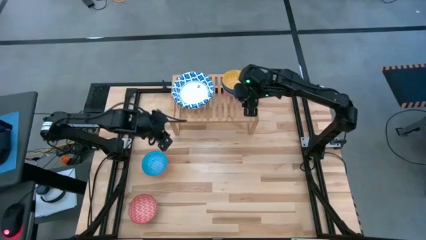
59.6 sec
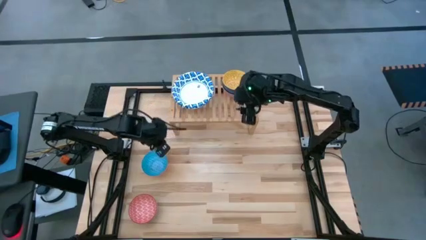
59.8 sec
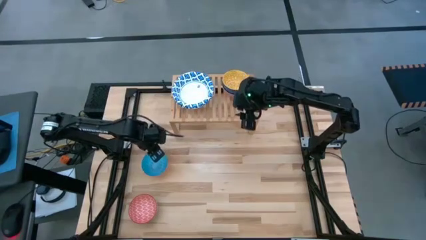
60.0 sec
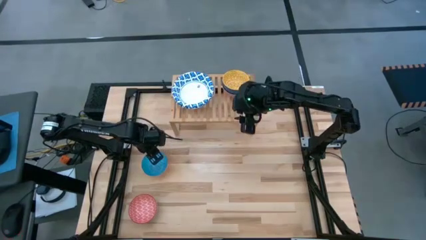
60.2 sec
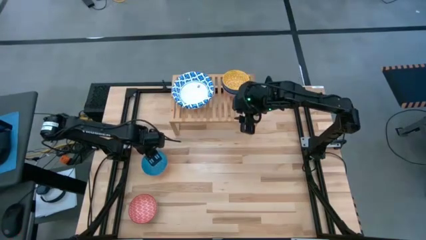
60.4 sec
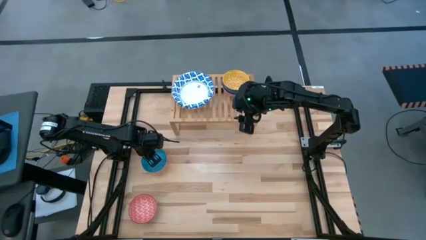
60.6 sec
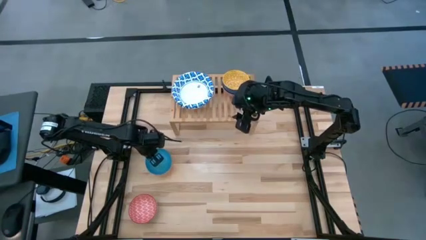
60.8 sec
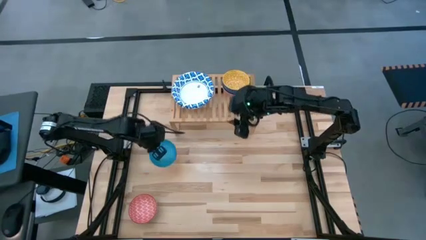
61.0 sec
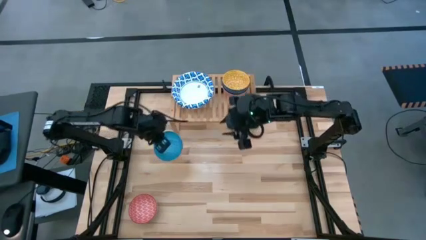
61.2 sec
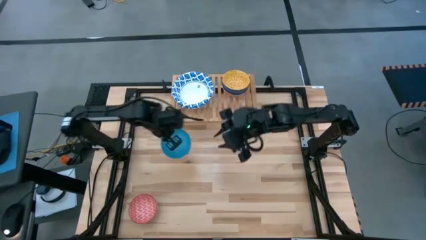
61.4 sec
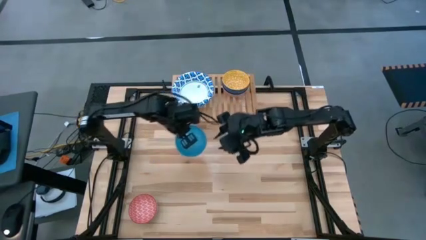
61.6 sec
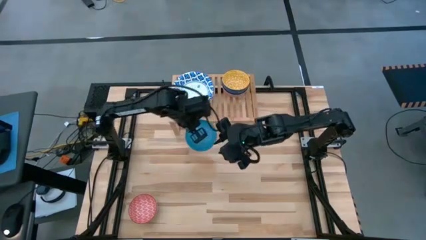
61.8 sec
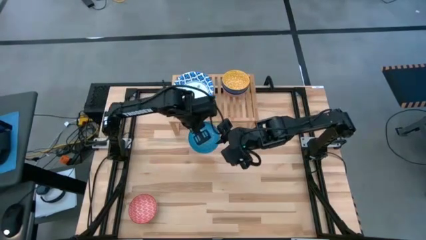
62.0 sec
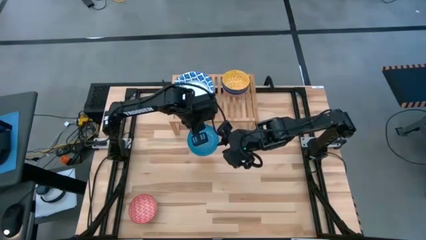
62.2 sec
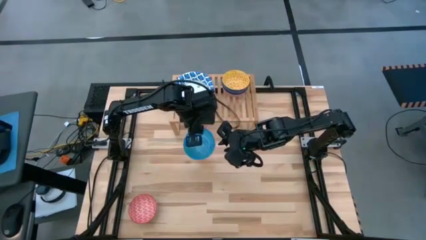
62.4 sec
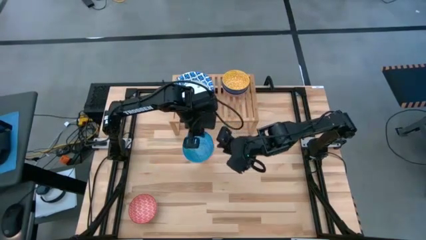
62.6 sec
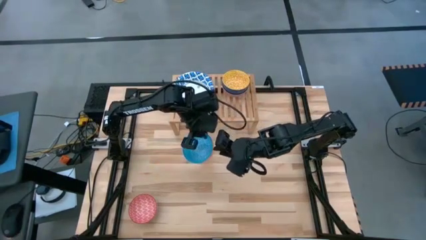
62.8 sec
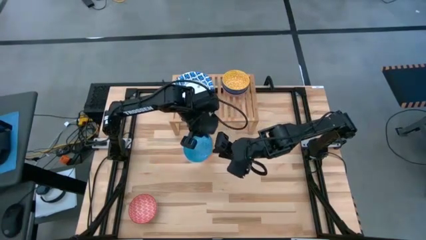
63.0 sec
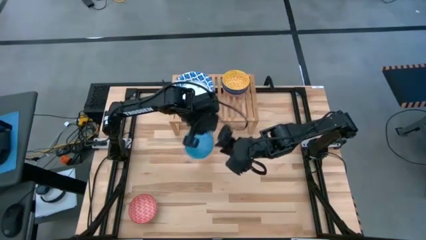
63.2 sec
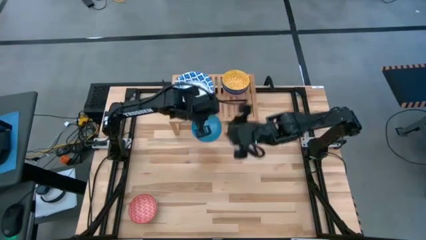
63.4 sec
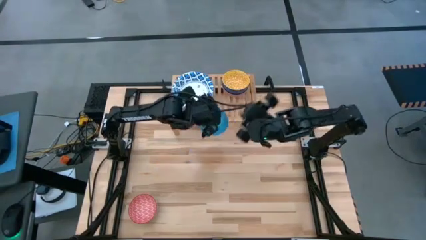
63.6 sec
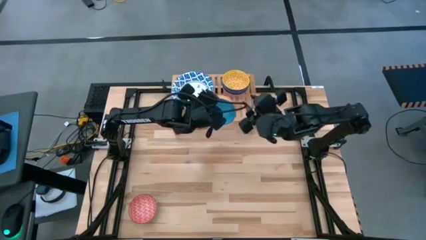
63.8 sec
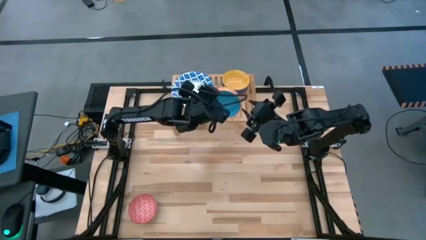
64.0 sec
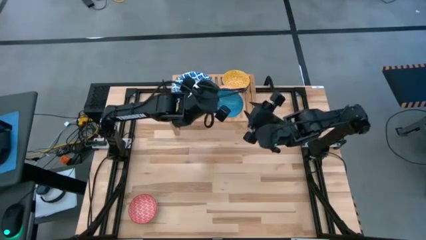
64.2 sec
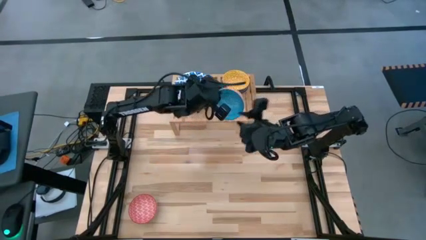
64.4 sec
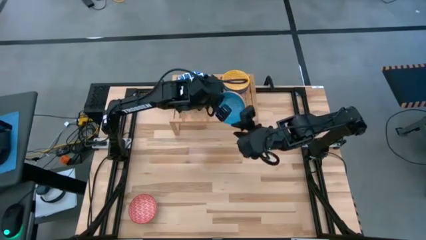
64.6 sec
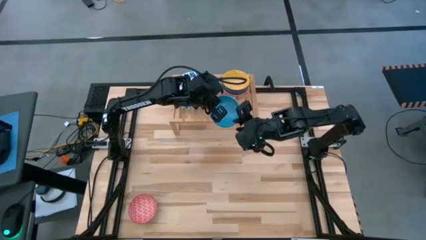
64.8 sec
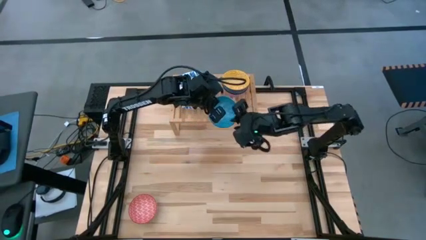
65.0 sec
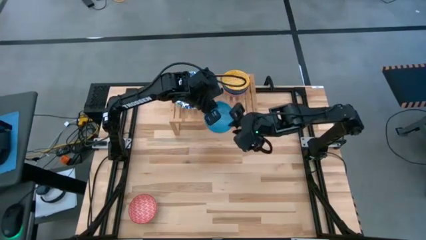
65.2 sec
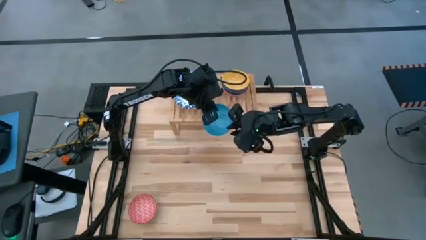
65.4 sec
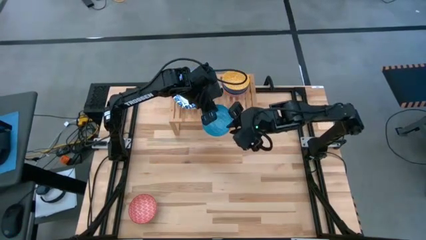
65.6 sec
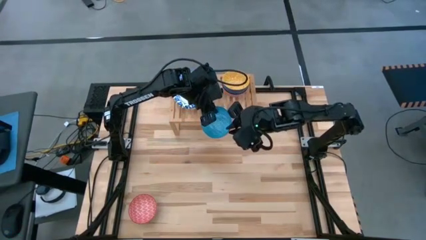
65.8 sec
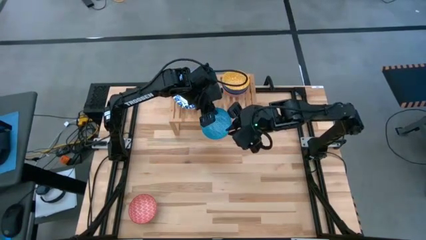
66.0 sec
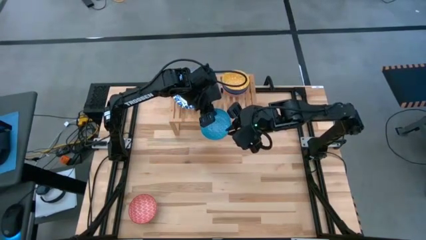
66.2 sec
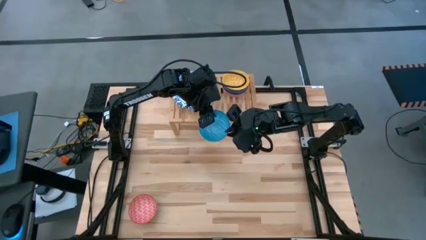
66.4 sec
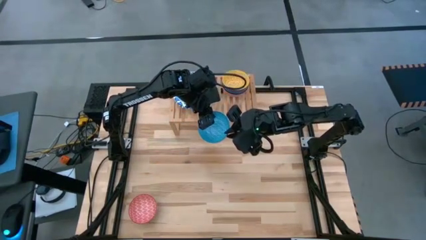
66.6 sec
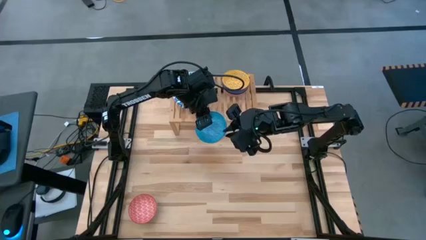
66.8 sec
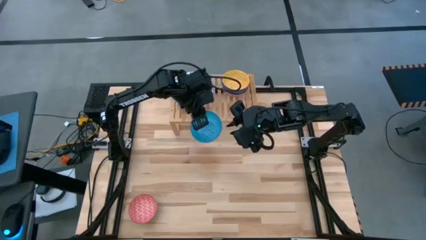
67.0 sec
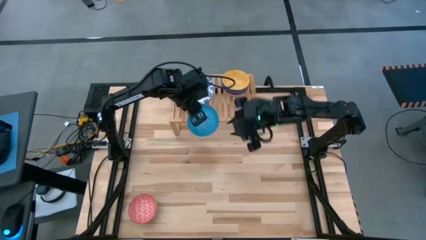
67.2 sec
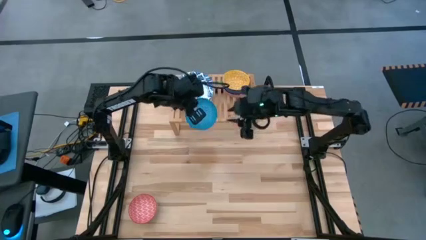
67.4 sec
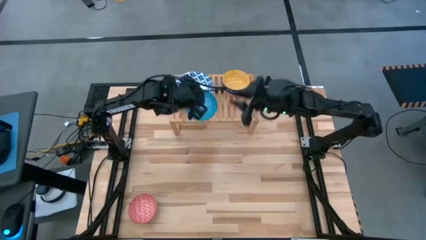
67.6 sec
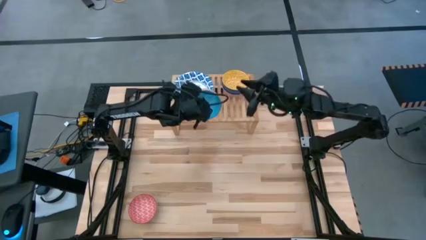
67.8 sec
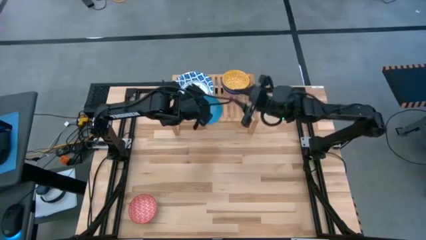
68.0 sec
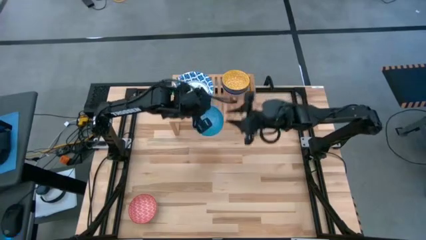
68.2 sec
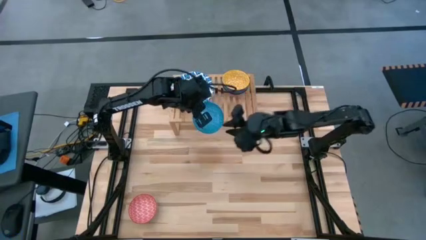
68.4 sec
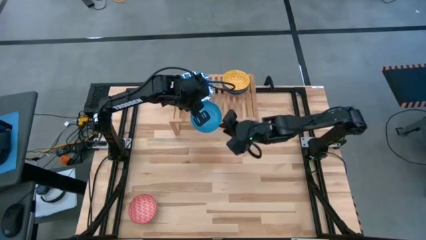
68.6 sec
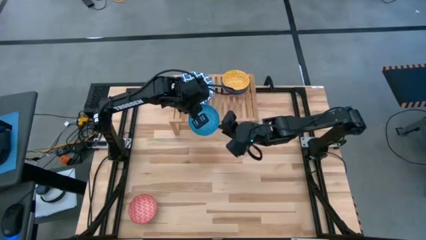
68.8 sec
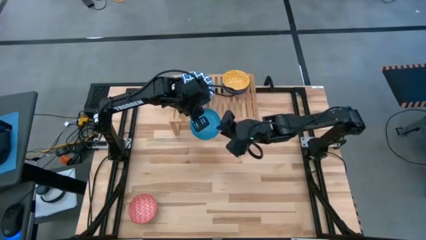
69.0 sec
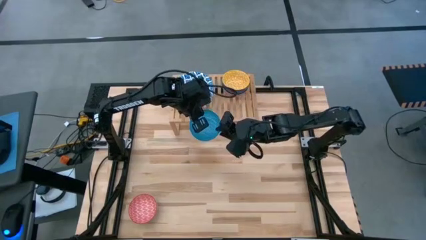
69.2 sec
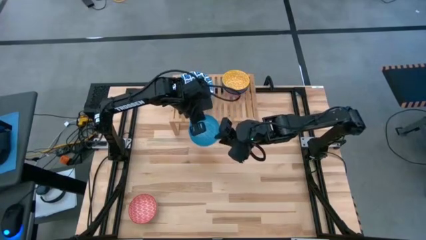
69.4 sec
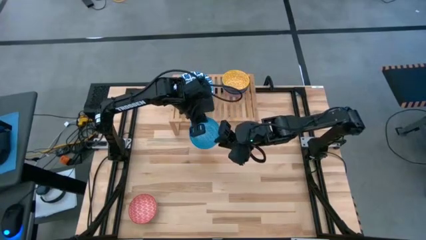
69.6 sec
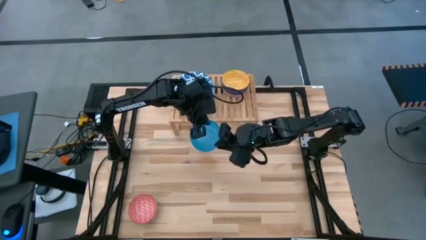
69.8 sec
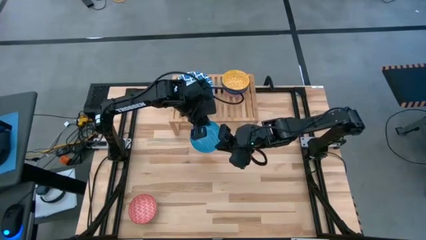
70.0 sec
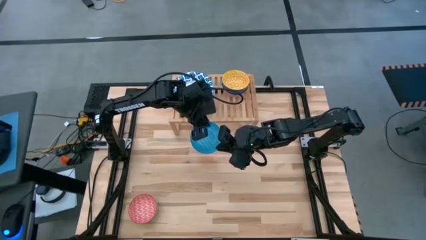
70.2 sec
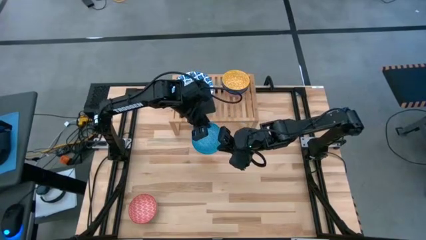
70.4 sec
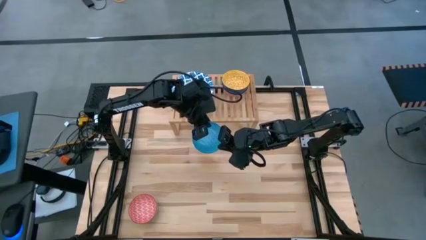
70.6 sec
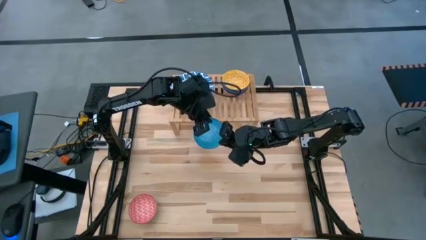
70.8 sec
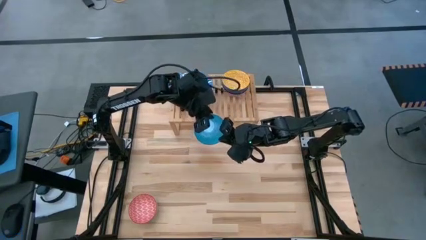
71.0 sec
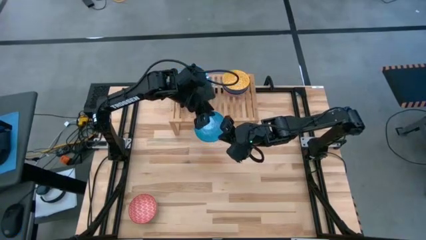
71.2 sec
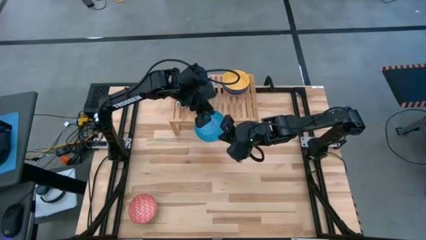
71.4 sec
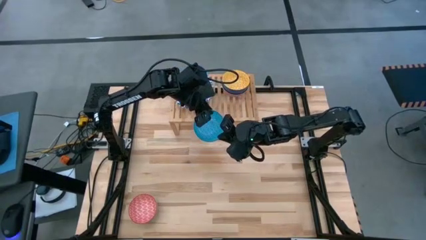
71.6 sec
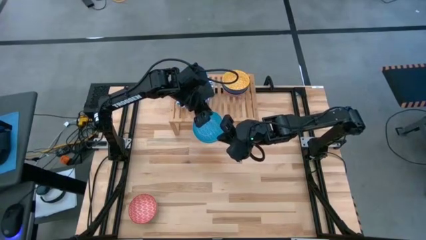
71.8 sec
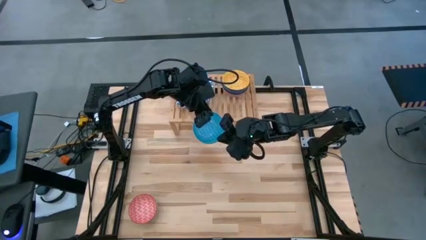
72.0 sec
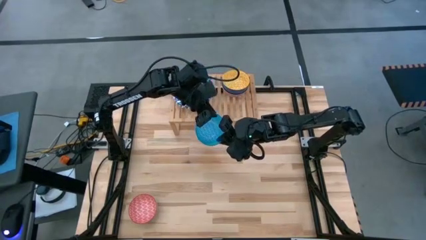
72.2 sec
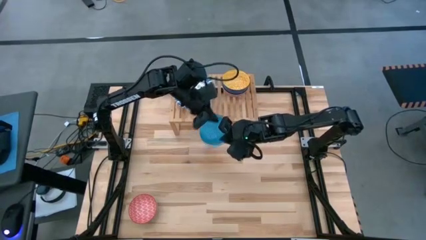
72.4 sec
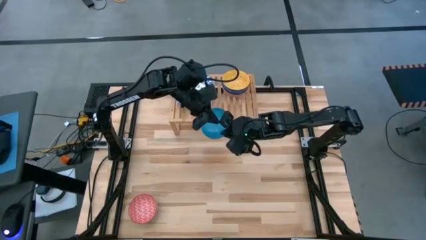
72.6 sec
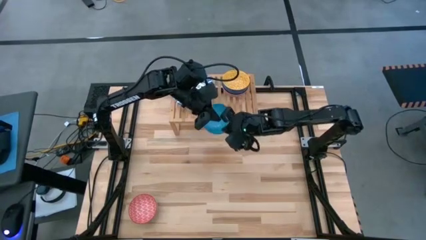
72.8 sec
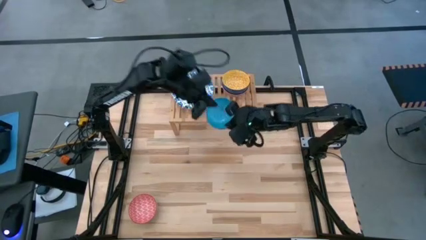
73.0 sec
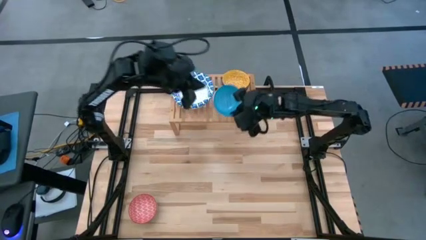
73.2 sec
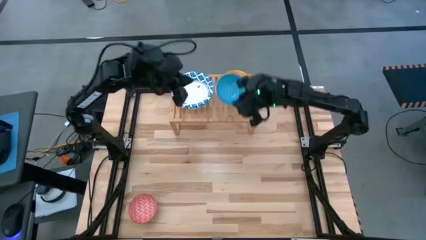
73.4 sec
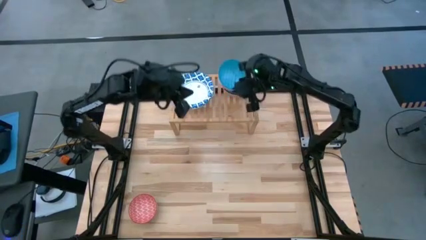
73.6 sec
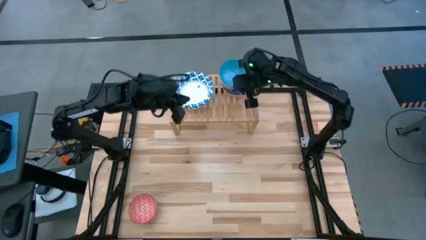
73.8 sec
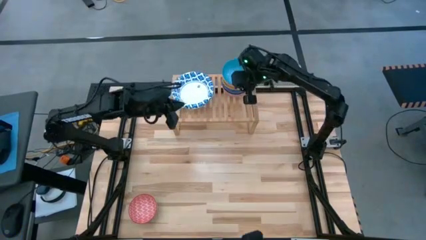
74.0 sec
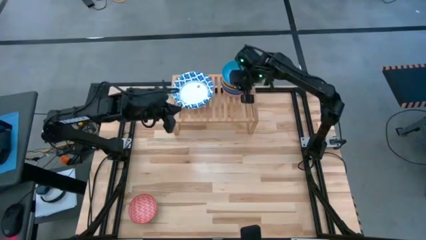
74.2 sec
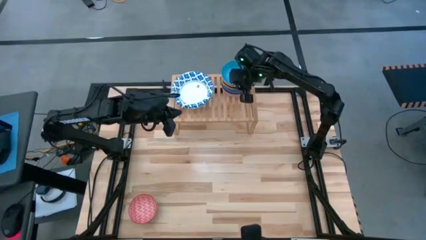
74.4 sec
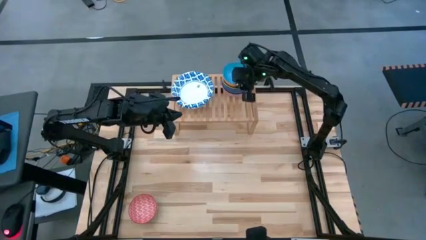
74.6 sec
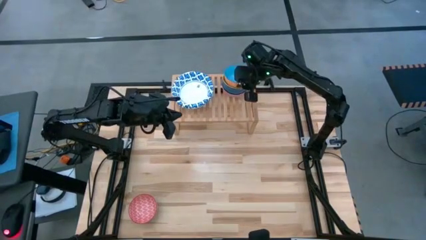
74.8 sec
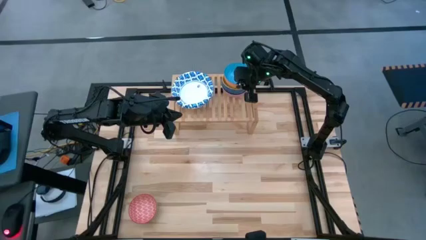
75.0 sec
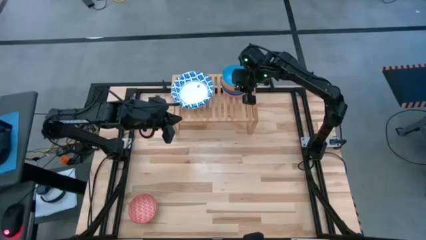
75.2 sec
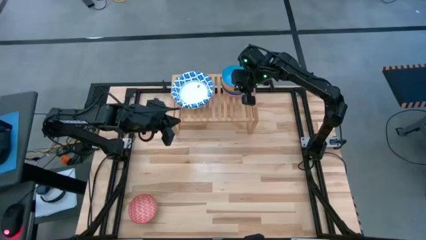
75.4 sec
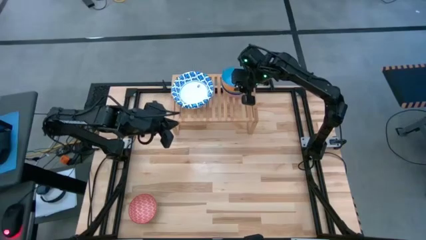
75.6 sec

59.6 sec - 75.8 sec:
Task: Place and stack bowls onto a shelf
Stack the orange blue patterned bowl on top of the blue yellow patterned bowl on the shelf
